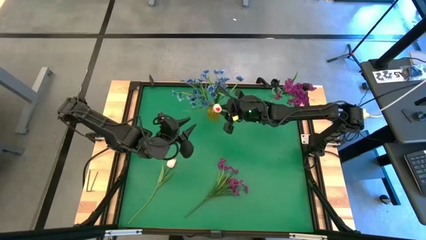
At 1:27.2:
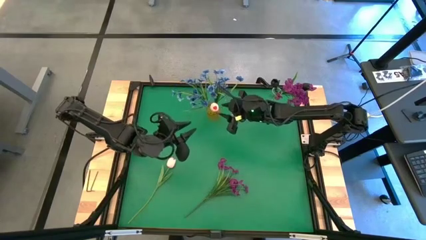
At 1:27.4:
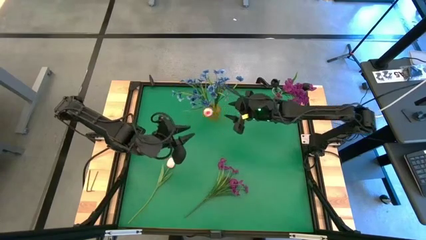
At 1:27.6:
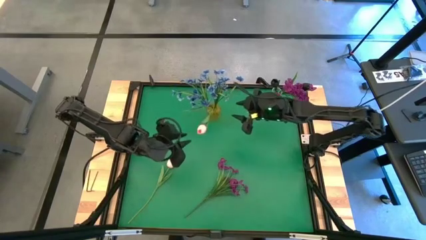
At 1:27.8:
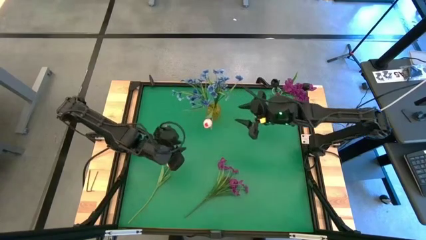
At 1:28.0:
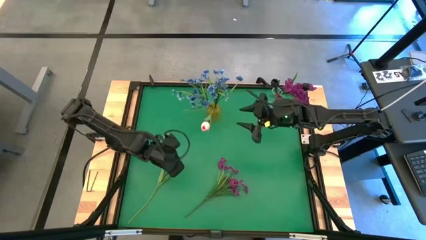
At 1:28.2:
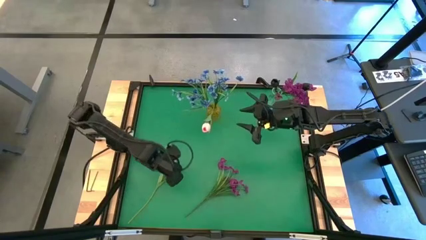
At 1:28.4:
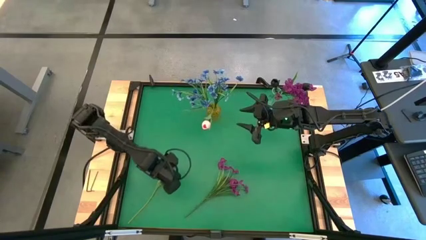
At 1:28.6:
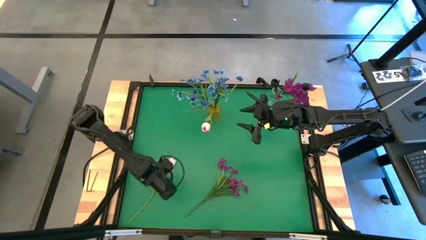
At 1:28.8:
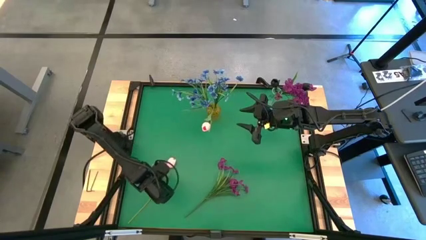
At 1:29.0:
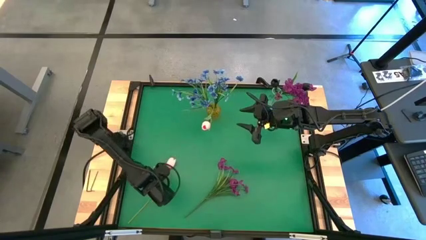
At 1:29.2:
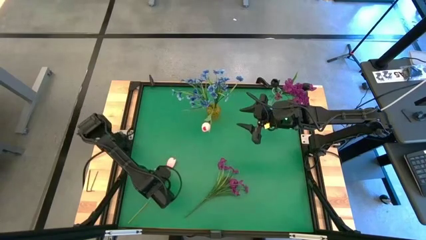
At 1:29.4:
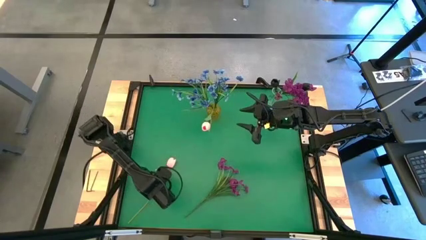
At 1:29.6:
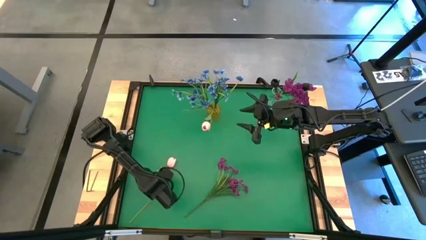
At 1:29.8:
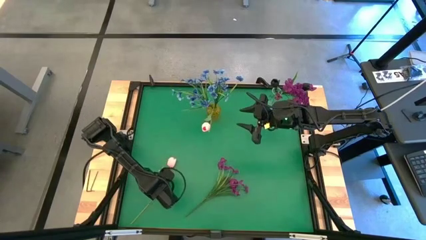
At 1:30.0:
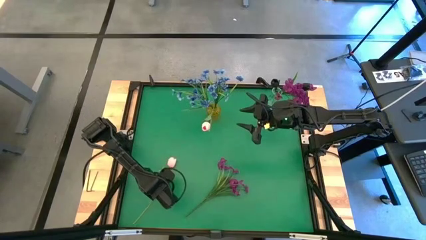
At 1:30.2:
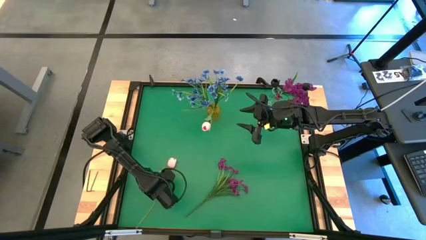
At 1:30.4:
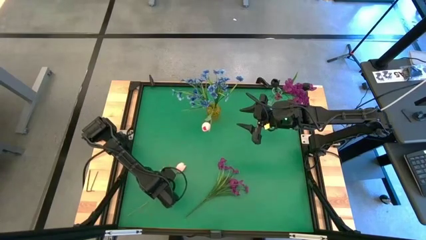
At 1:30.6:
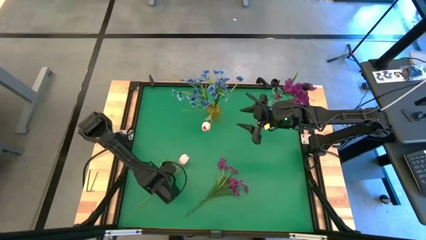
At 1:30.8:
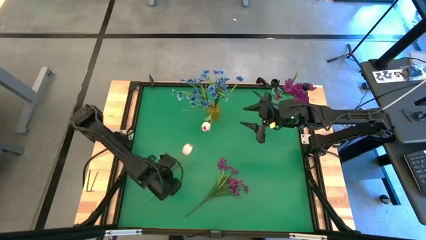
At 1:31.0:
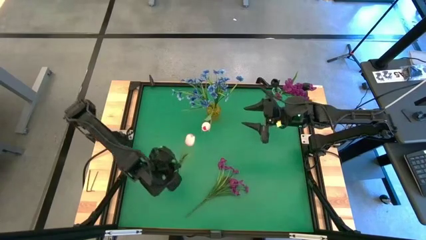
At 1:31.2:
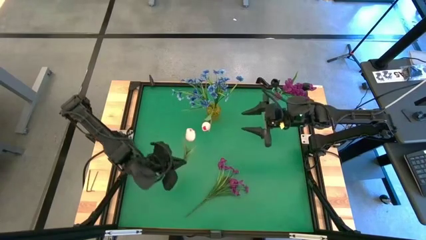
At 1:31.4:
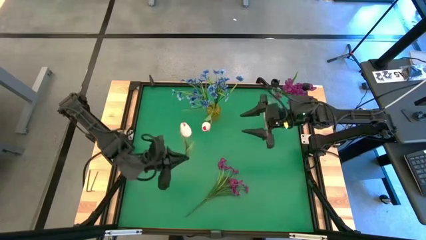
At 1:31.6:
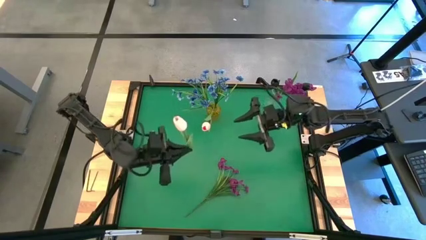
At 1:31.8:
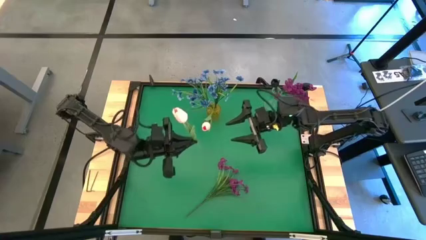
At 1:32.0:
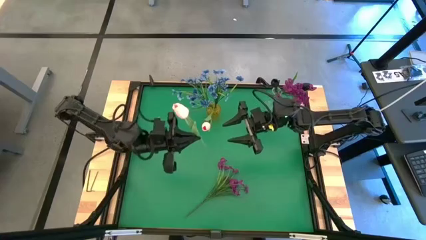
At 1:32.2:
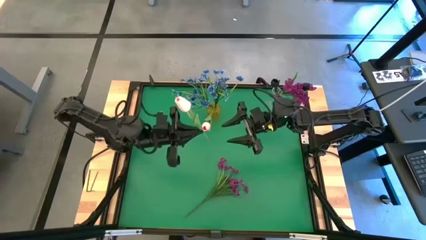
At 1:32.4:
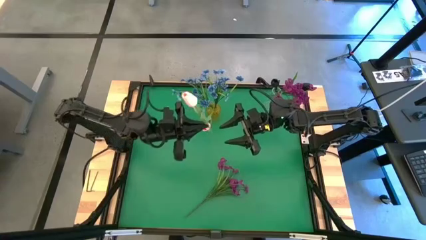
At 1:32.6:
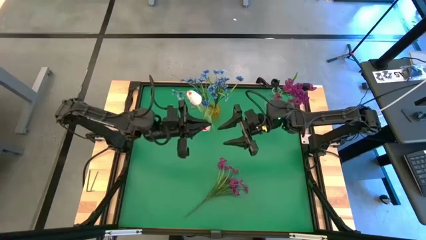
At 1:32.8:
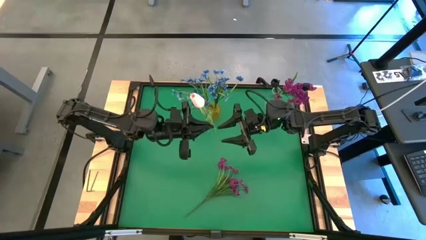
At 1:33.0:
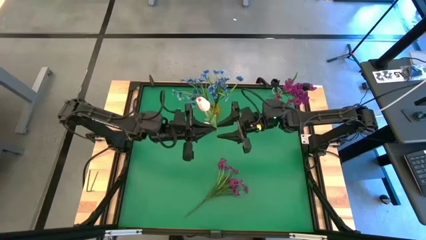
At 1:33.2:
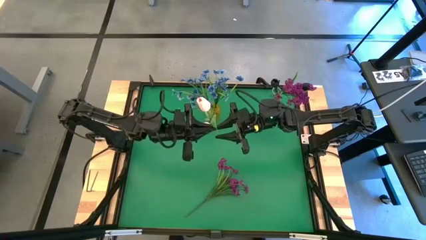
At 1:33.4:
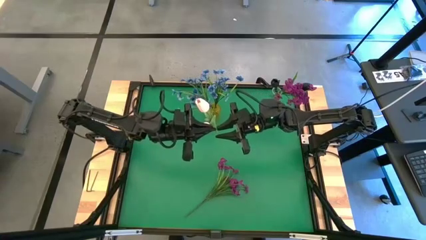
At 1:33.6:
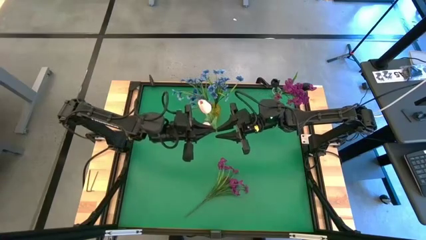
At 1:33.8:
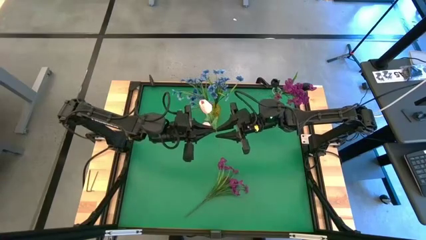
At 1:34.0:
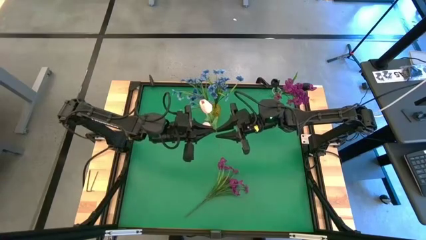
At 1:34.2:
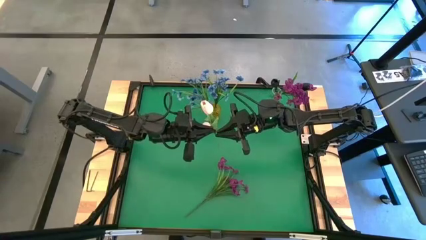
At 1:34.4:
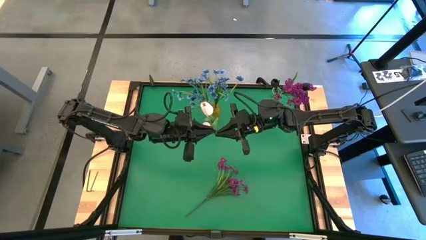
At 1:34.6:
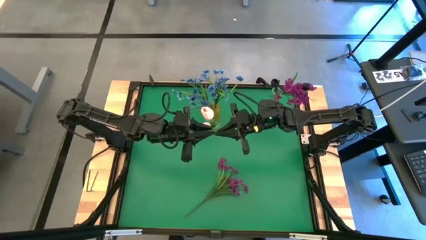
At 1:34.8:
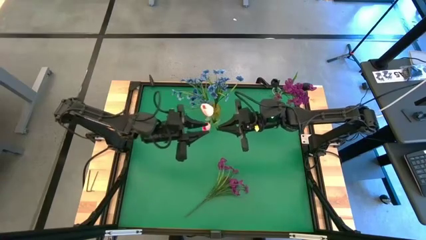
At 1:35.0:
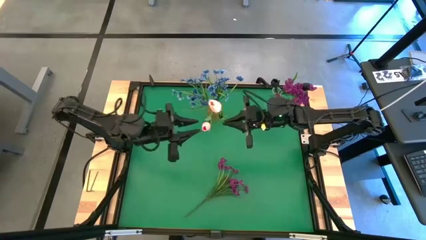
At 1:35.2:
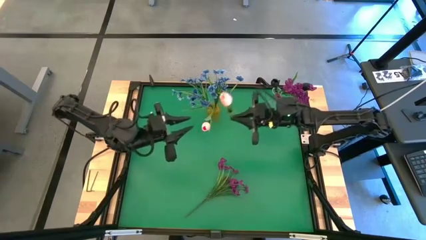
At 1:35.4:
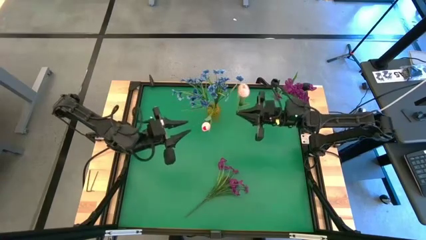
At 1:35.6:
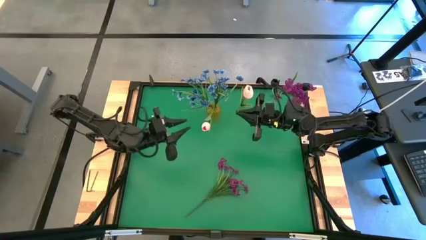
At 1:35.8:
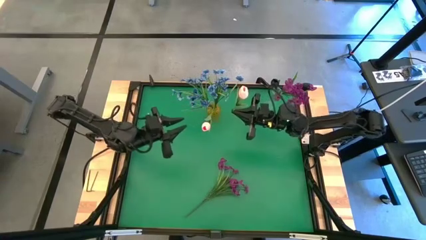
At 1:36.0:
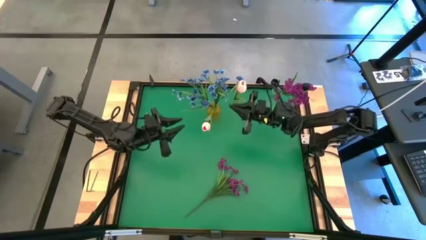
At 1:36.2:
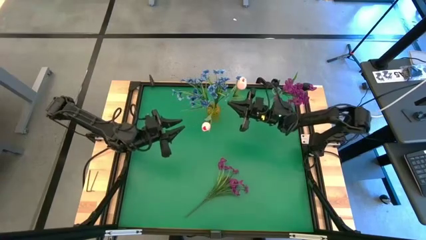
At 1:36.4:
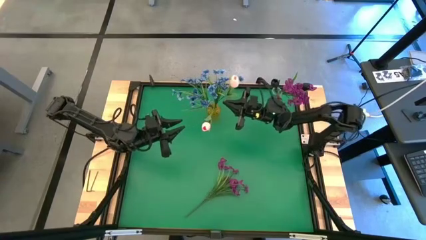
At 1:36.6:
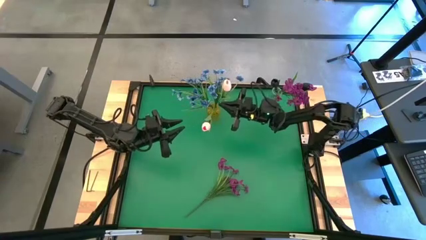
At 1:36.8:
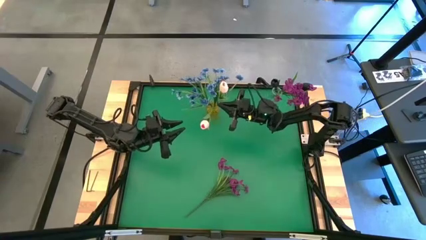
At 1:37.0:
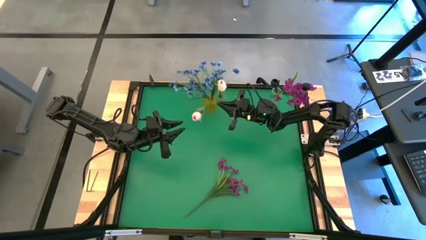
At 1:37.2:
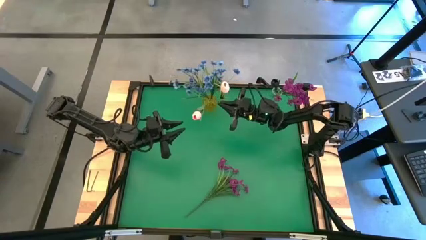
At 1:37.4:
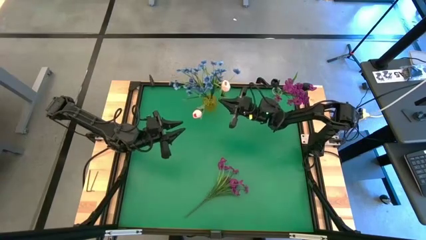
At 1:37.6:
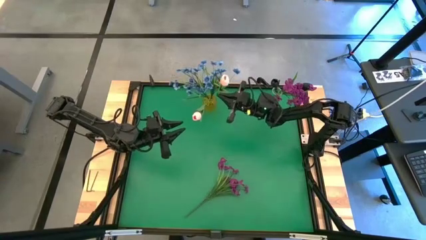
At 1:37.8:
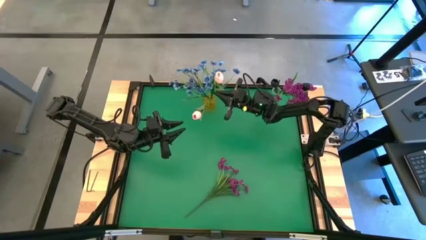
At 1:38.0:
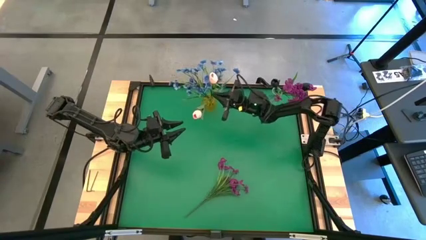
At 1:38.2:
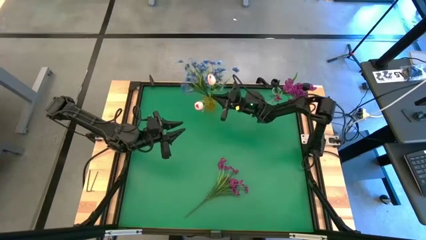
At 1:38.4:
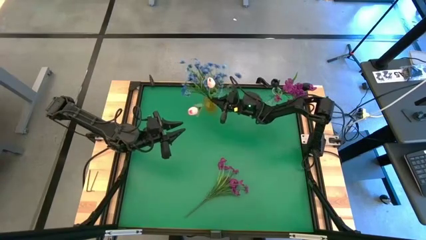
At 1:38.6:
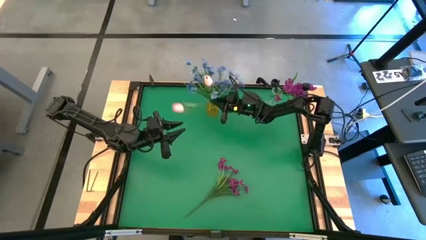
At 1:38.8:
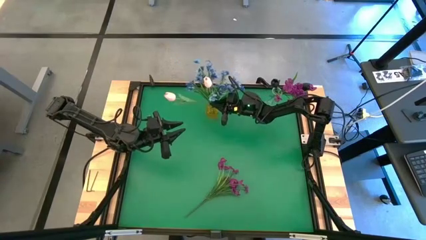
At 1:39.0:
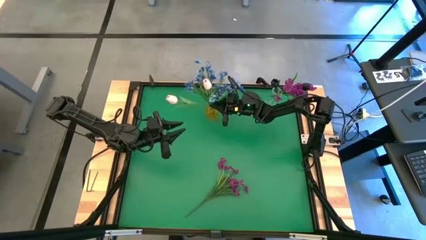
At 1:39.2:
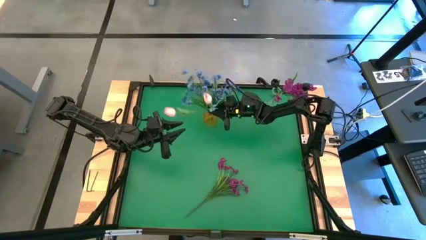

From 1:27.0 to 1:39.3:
Task: Sort flowers into vase by color
Put the pink flower into the yellow vase
